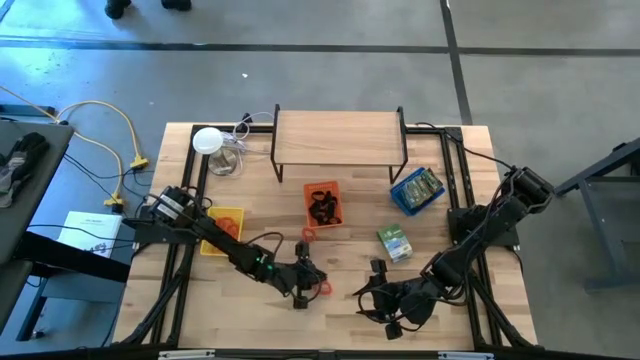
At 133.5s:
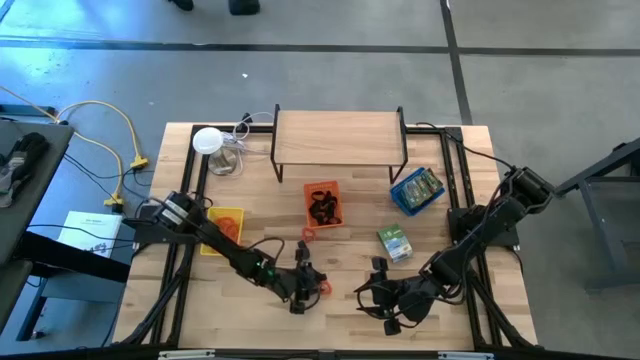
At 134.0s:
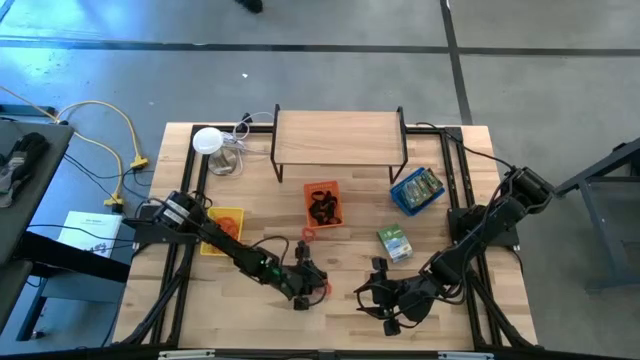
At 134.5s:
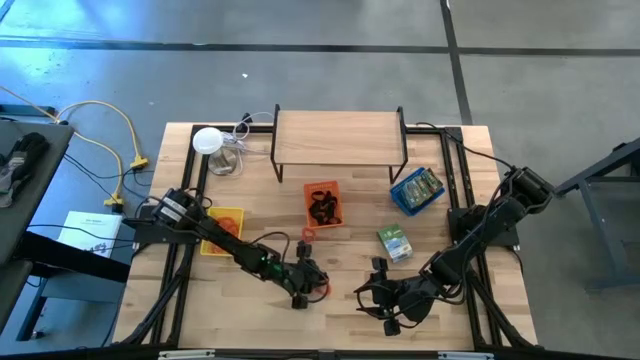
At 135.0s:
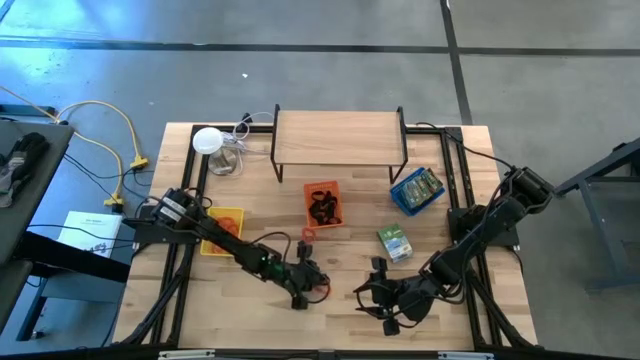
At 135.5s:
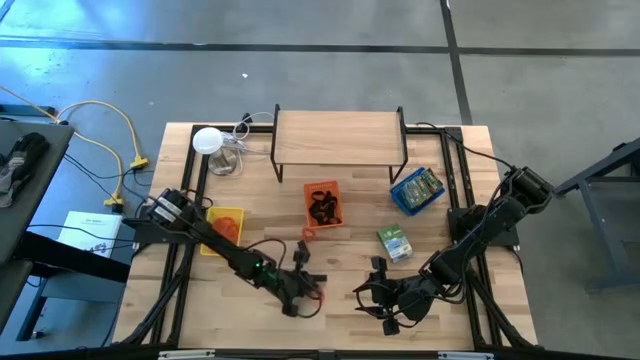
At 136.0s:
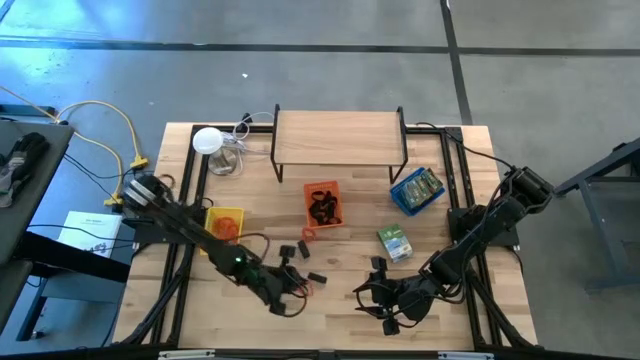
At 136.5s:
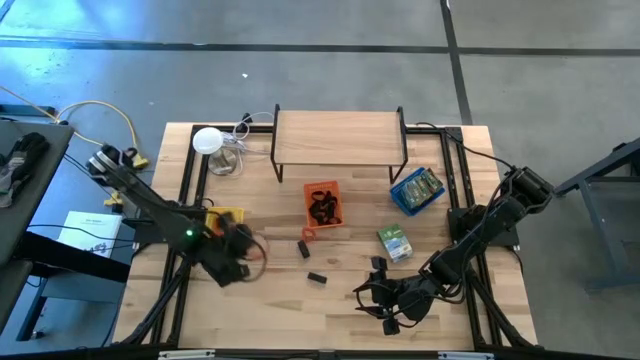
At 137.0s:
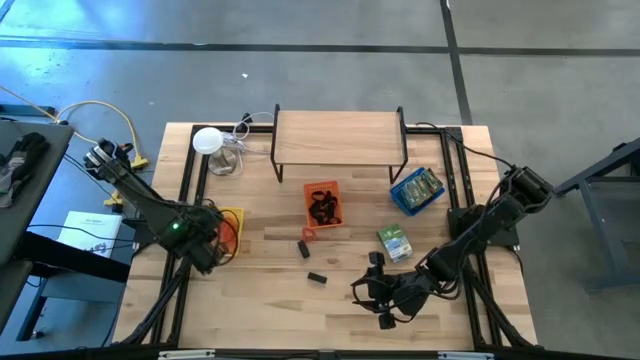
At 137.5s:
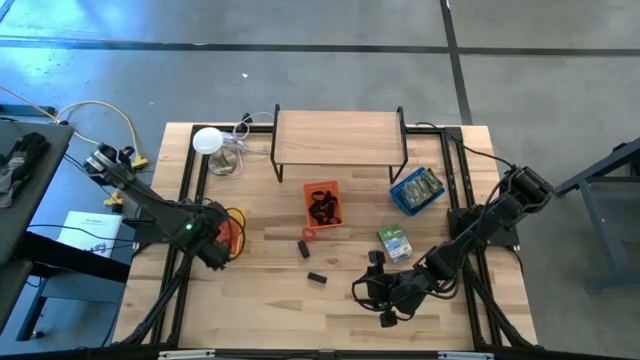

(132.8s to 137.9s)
Task: Pick & Place Office Desk Supplies
Put the orange spring key chain into the yellow bin

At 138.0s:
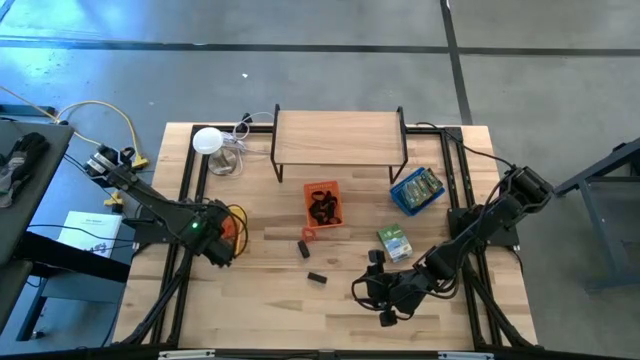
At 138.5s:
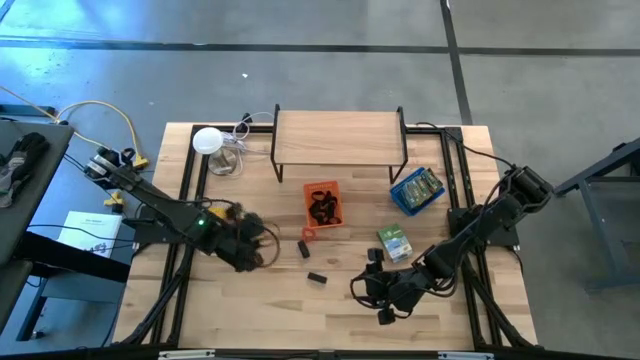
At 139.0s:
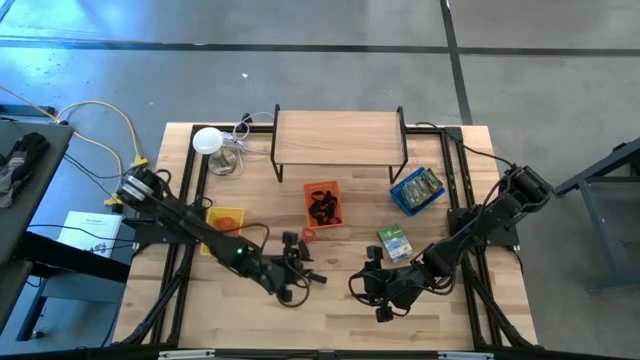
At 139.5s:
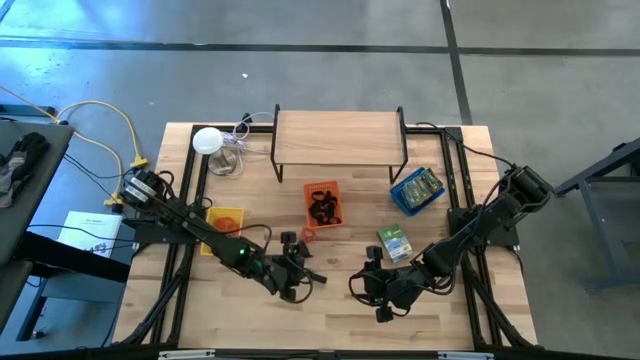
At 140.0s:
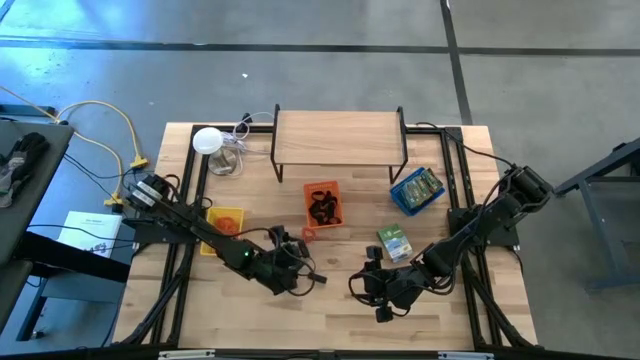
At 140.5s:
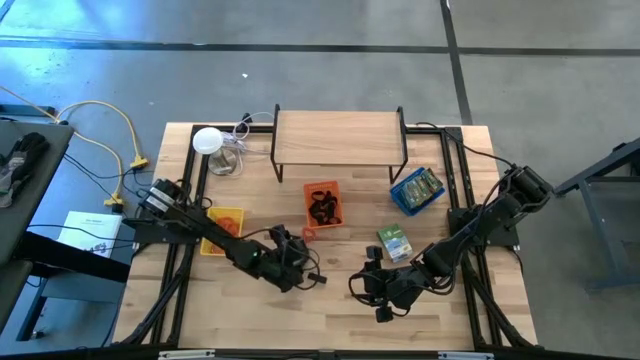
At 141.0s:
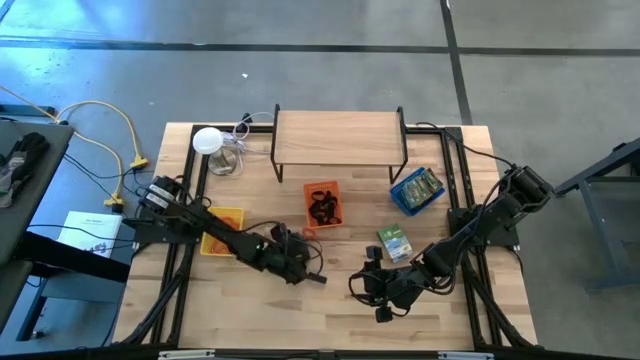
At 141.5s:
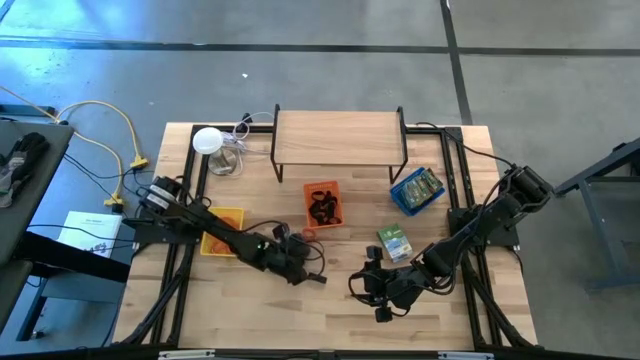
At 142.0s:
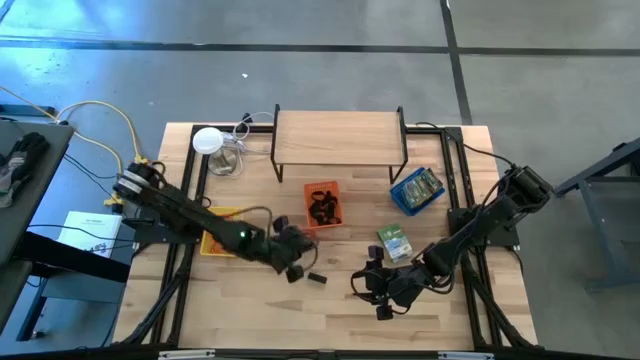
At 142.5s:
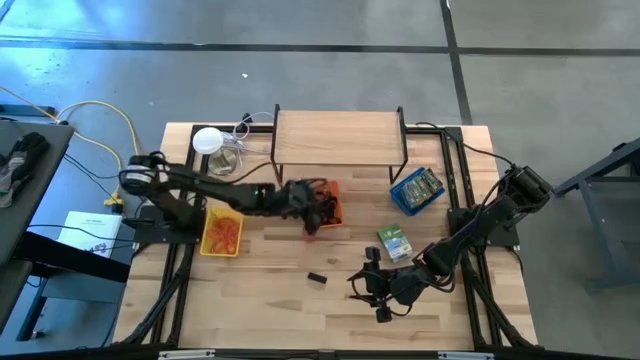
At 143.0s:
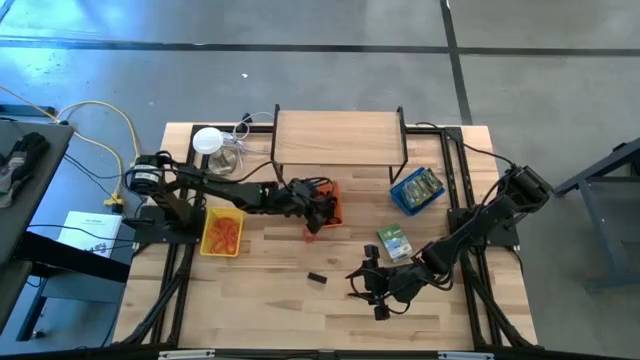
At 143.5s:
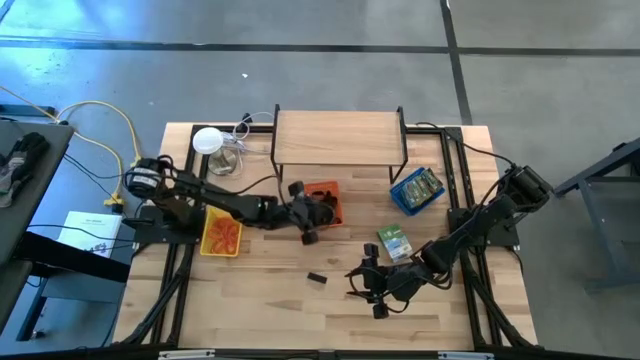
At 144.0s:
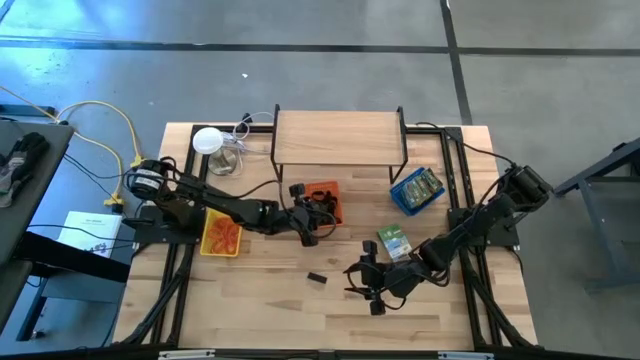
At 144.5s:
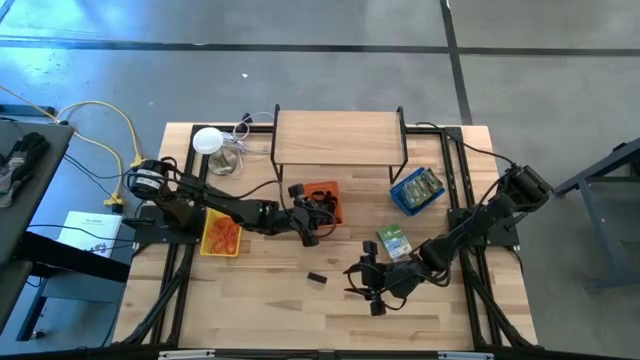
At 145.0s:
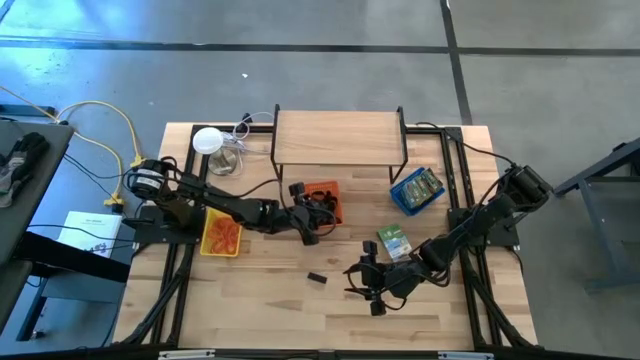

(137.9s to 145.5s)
Put the black rubber band into the orange bin

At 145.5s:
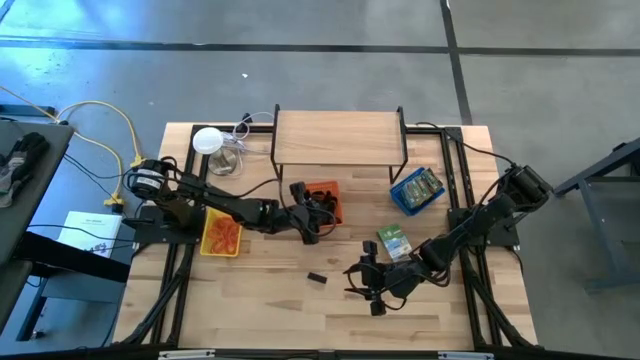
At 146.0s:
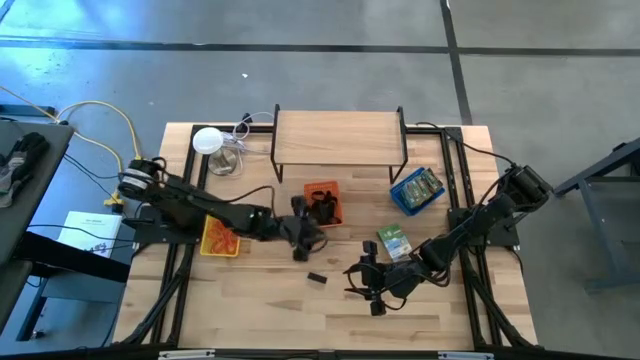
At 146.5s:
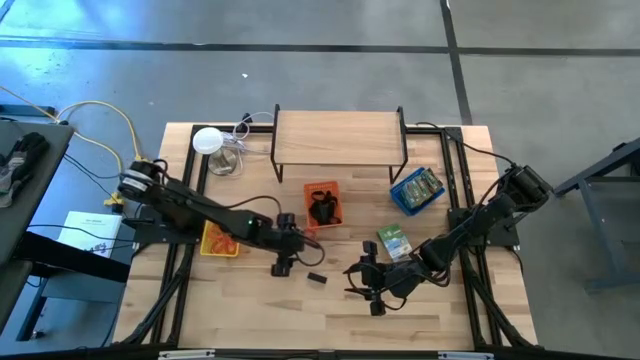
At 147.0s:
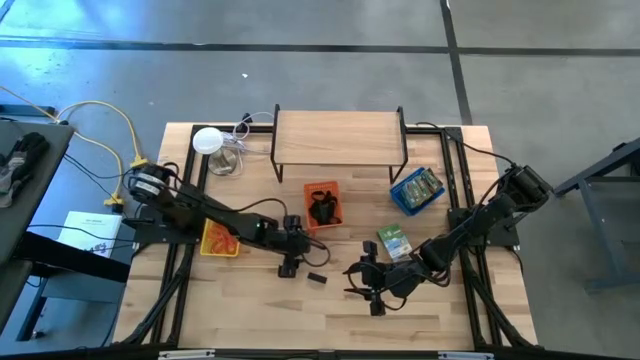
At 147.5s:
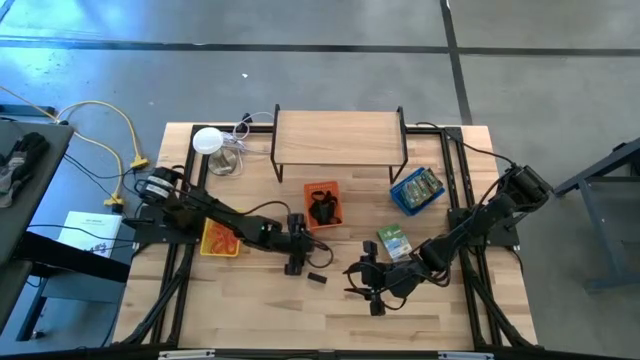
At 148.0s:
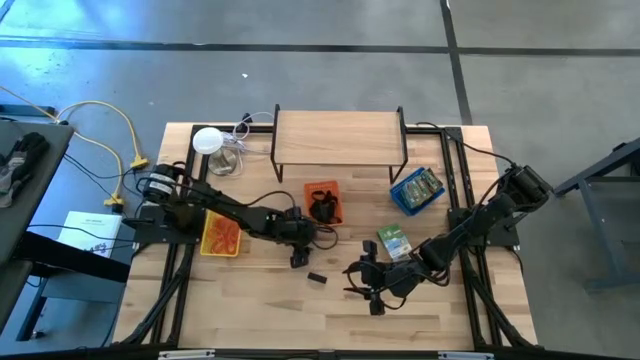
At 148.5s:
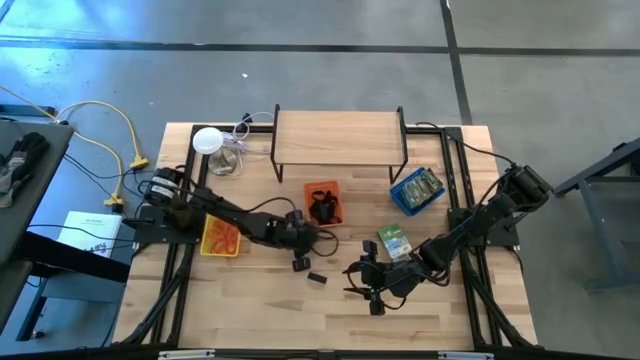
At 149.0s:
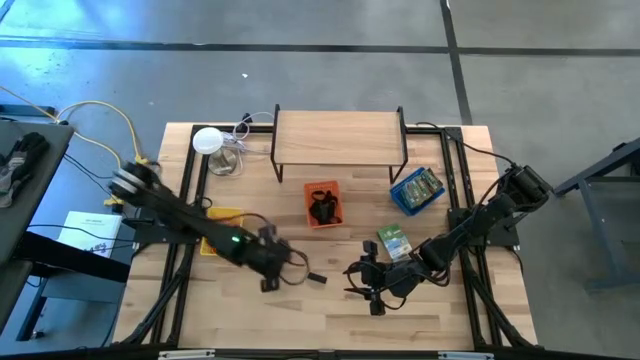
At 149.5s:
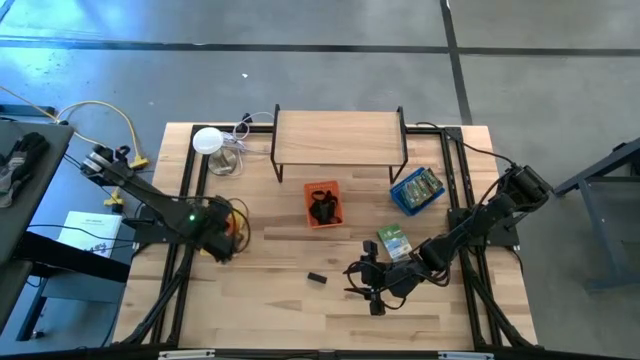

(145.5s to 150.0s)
Put the orange spring key chain into the yellow bin

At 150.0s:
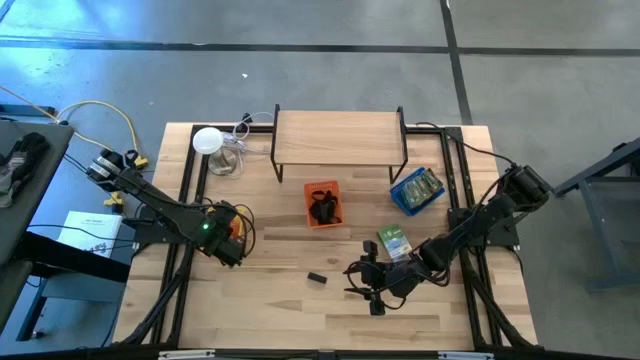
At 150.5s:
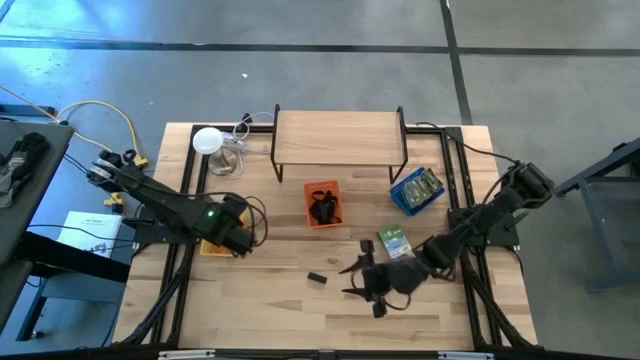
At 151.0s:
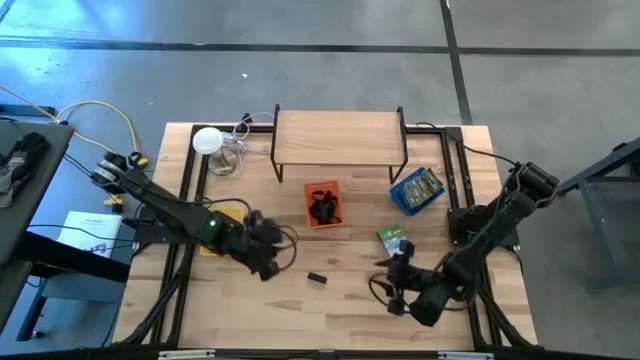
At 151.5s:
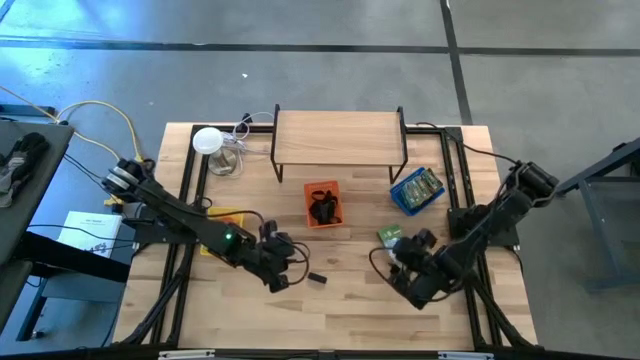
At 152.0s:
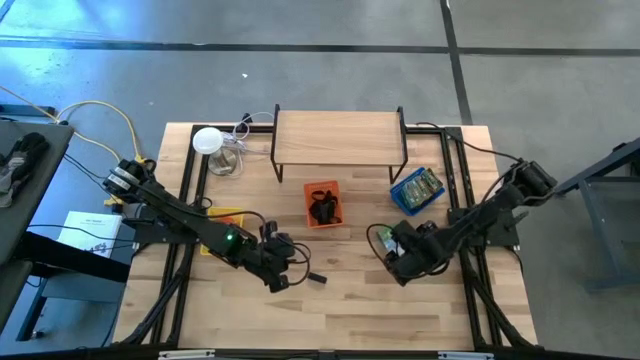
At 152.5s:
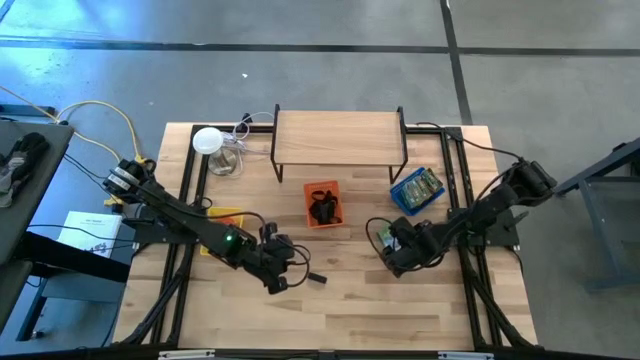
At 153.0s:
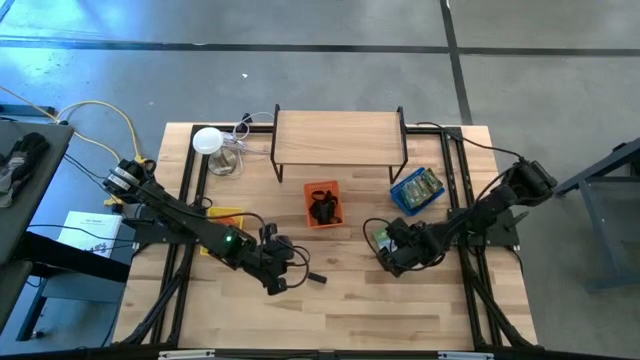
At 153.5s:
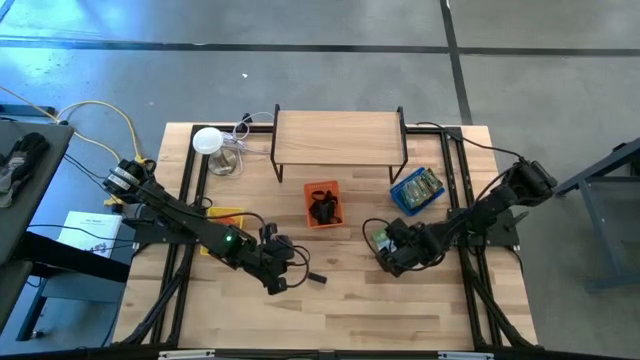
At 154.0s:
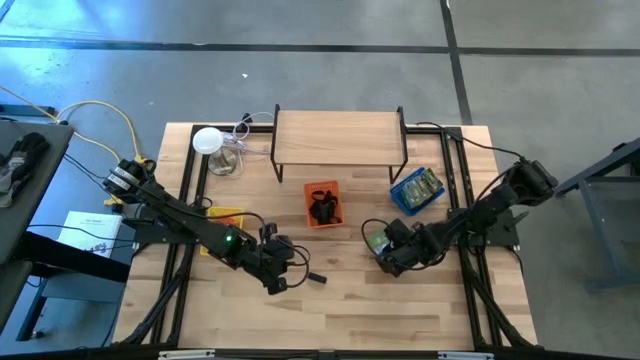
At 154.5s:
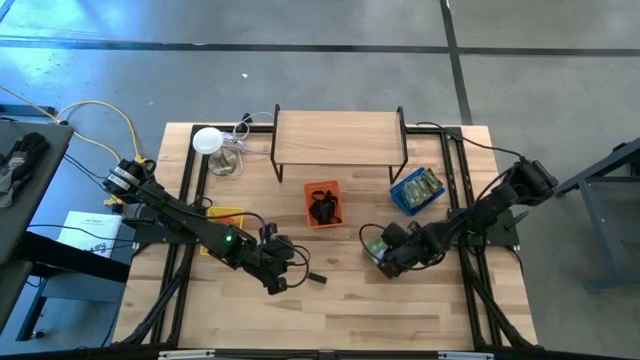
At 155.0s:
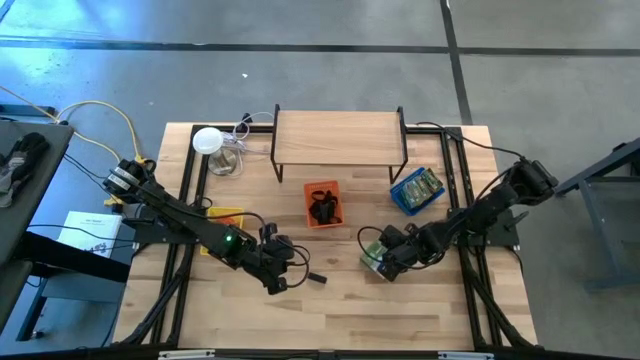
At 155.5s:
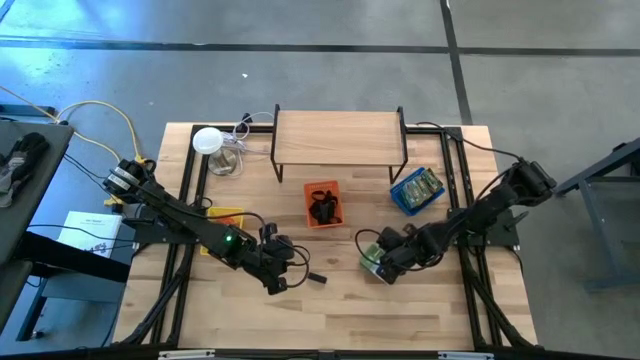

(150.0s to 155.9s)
Put the yellow crayon box into the blue bin
